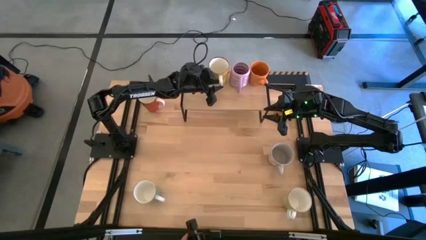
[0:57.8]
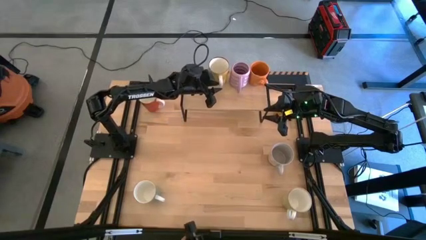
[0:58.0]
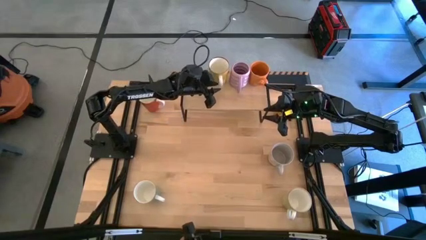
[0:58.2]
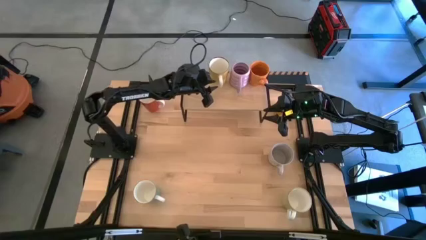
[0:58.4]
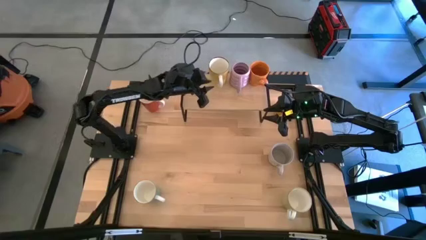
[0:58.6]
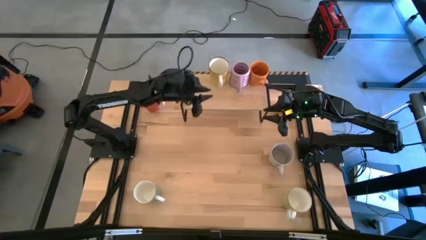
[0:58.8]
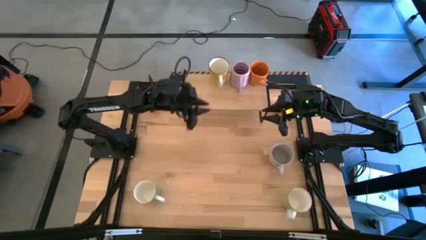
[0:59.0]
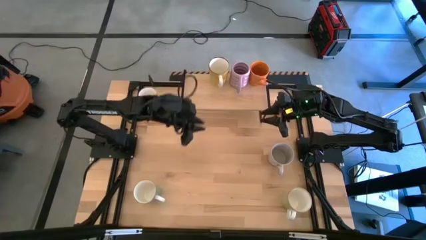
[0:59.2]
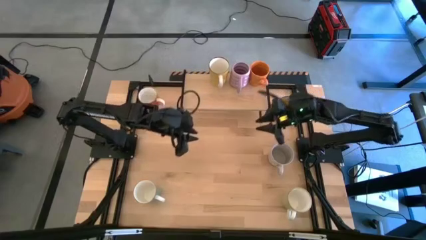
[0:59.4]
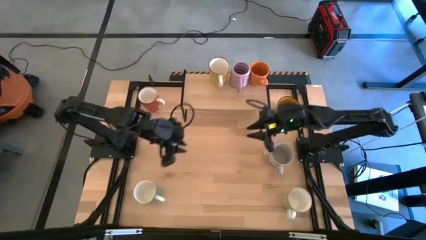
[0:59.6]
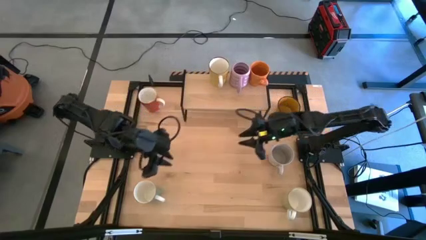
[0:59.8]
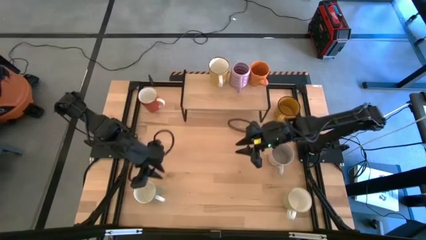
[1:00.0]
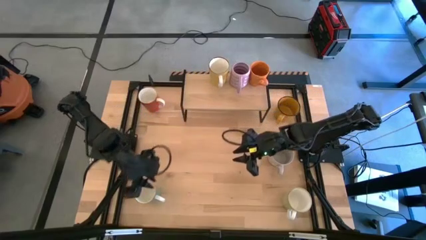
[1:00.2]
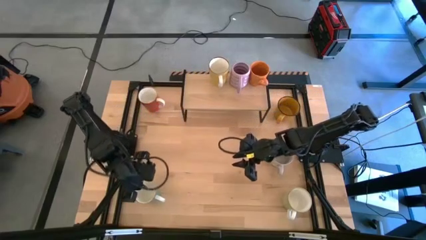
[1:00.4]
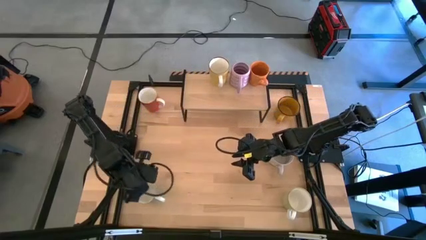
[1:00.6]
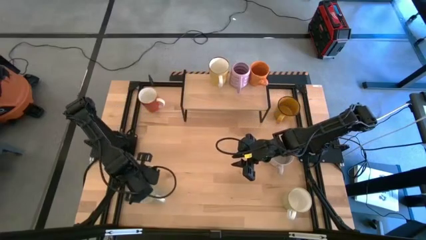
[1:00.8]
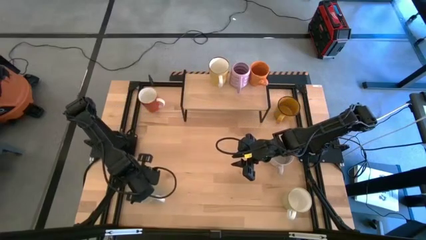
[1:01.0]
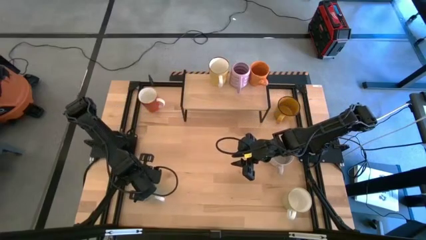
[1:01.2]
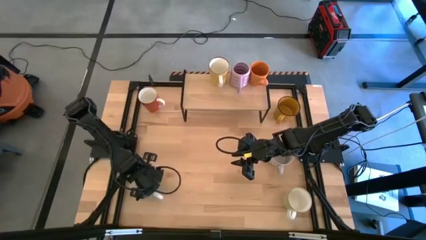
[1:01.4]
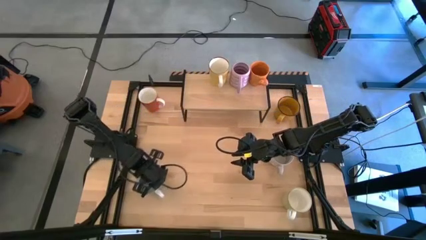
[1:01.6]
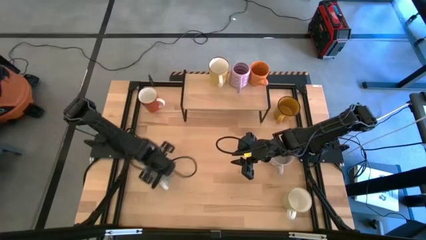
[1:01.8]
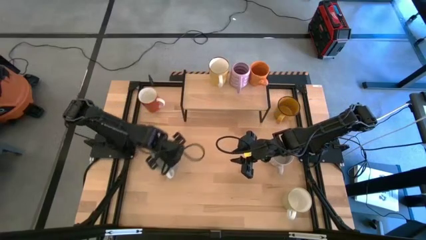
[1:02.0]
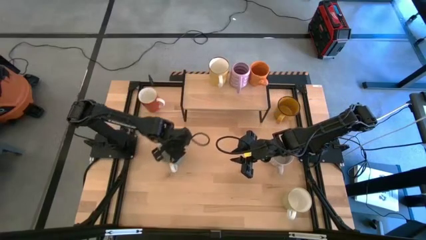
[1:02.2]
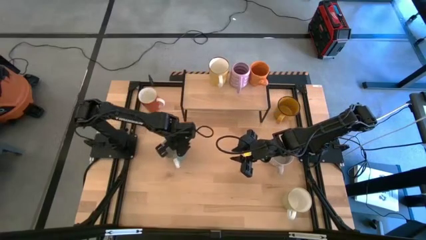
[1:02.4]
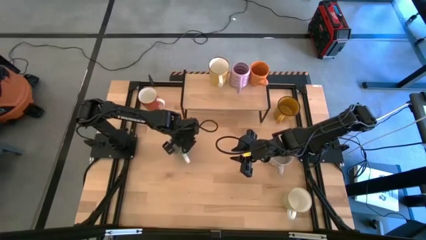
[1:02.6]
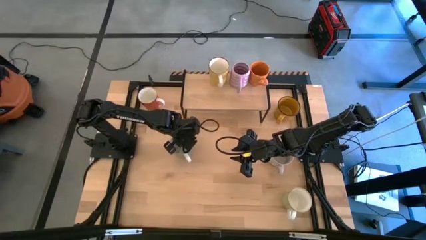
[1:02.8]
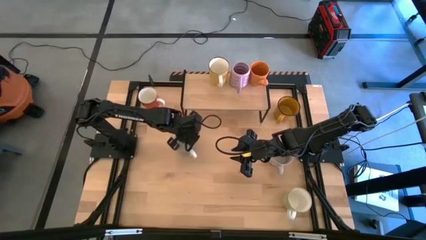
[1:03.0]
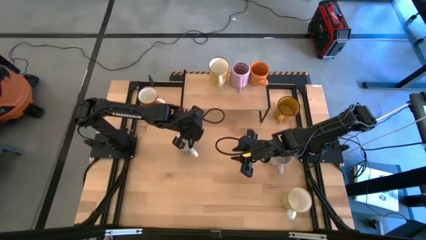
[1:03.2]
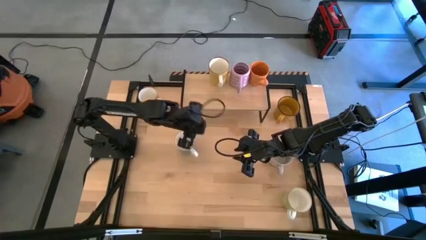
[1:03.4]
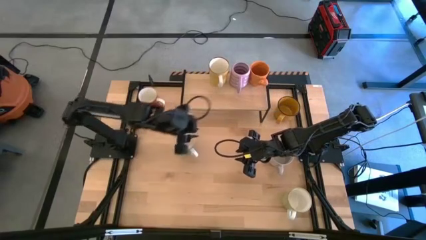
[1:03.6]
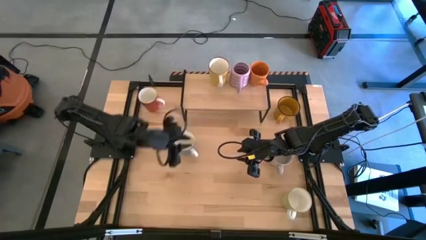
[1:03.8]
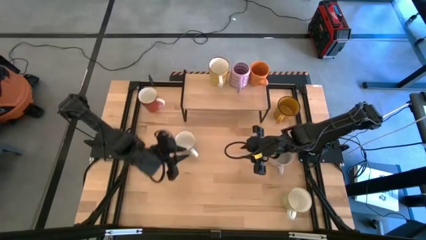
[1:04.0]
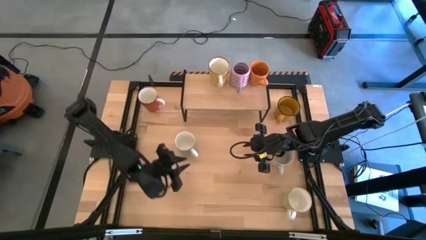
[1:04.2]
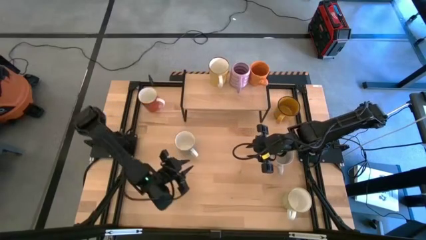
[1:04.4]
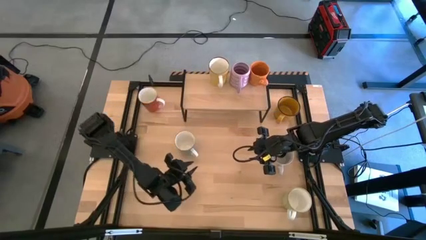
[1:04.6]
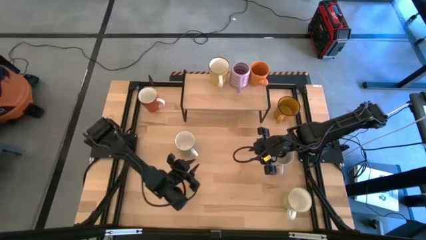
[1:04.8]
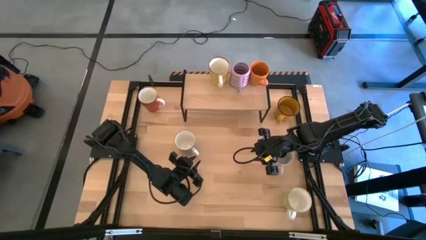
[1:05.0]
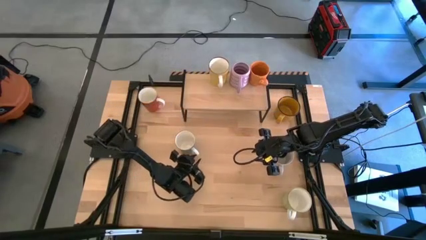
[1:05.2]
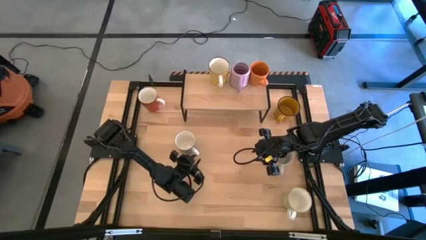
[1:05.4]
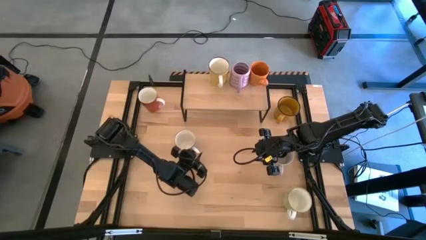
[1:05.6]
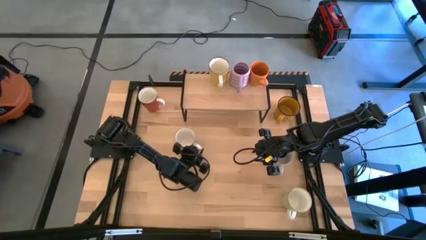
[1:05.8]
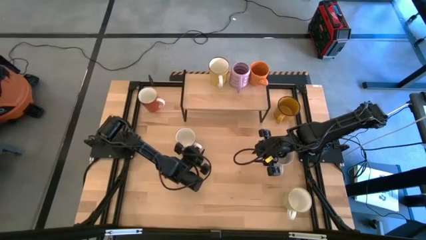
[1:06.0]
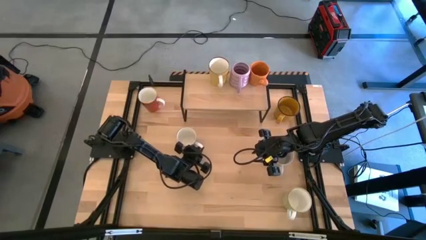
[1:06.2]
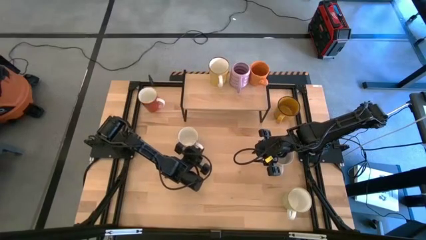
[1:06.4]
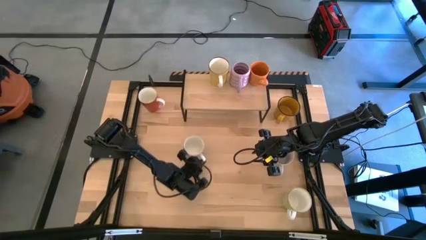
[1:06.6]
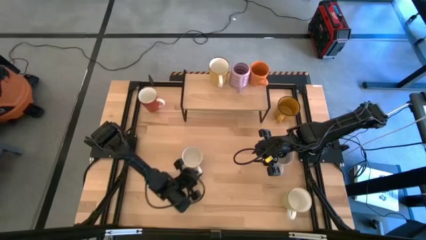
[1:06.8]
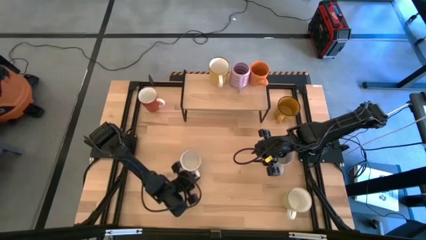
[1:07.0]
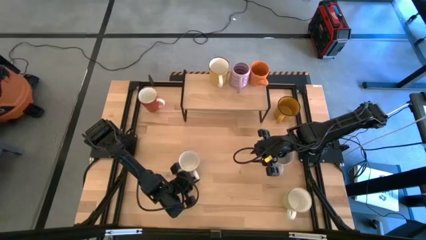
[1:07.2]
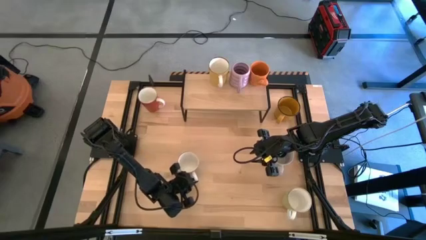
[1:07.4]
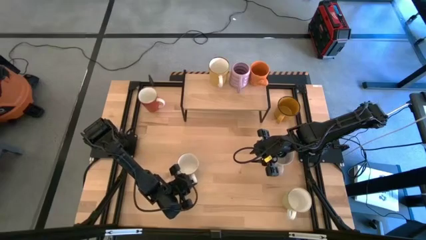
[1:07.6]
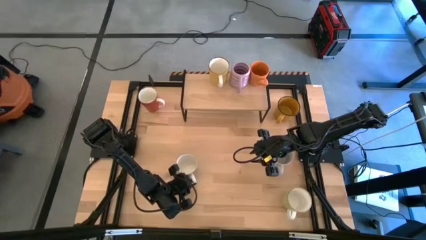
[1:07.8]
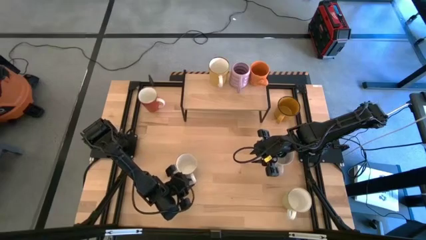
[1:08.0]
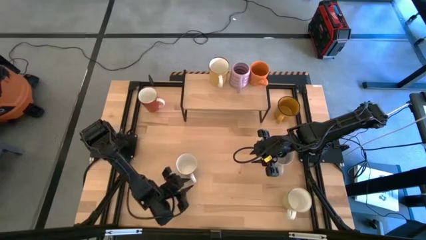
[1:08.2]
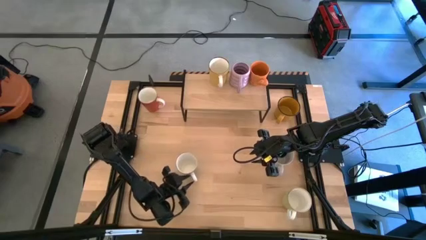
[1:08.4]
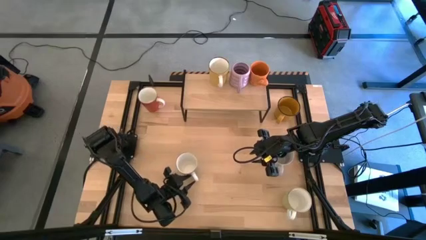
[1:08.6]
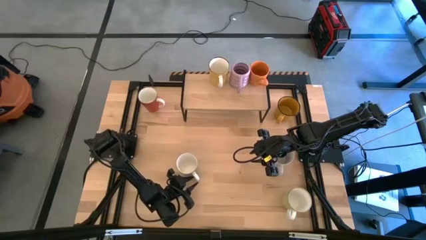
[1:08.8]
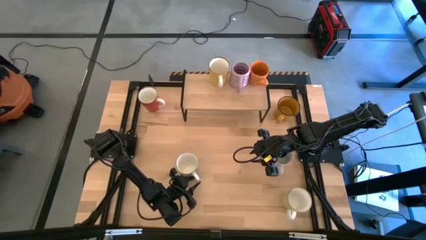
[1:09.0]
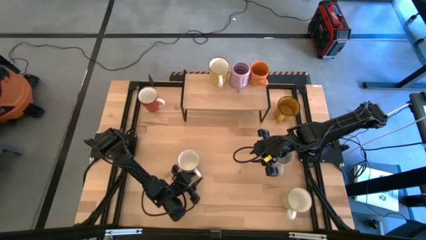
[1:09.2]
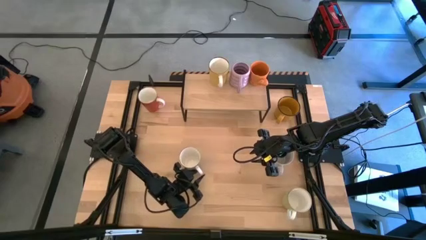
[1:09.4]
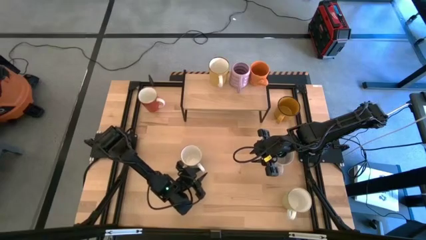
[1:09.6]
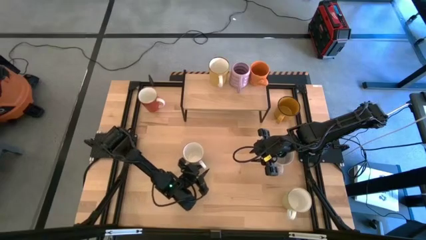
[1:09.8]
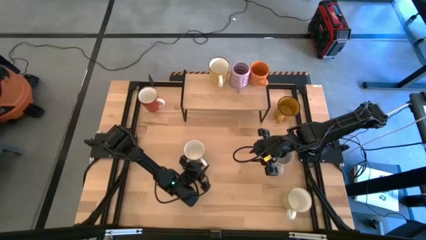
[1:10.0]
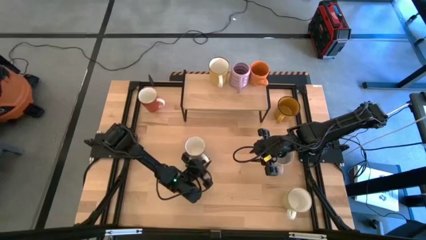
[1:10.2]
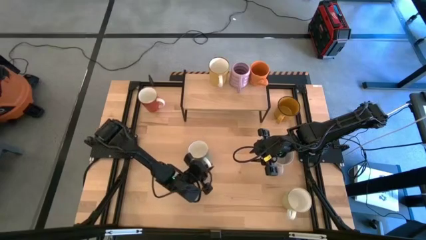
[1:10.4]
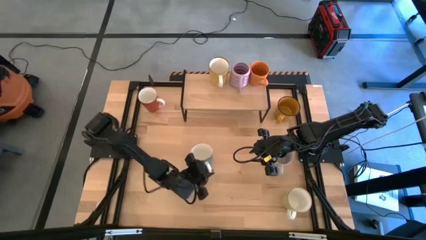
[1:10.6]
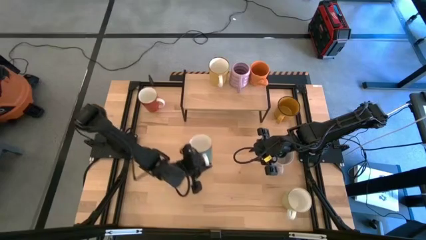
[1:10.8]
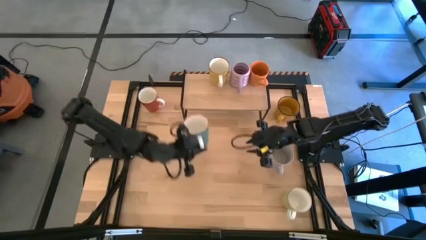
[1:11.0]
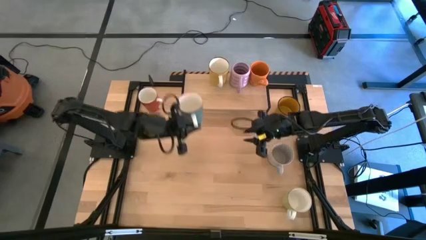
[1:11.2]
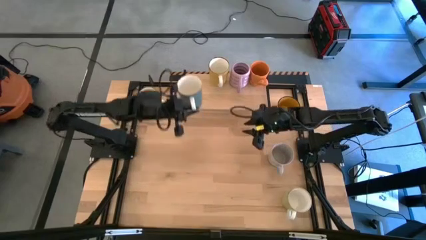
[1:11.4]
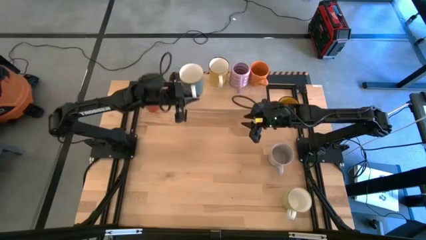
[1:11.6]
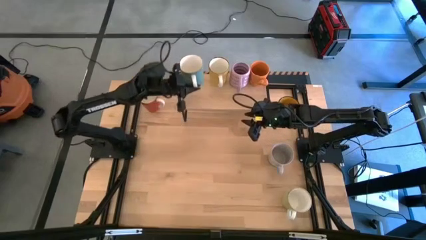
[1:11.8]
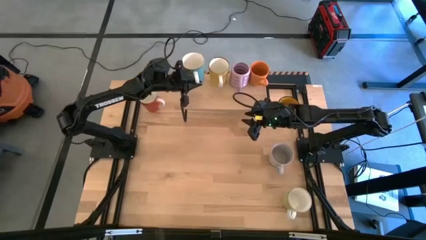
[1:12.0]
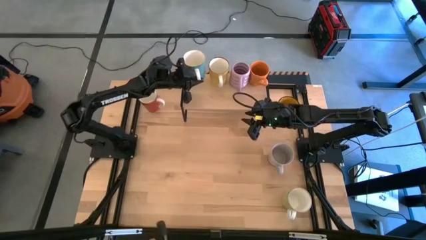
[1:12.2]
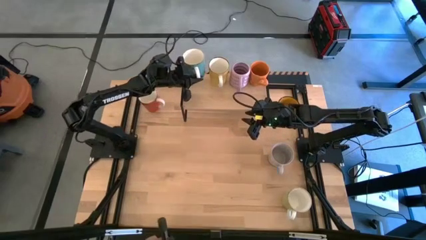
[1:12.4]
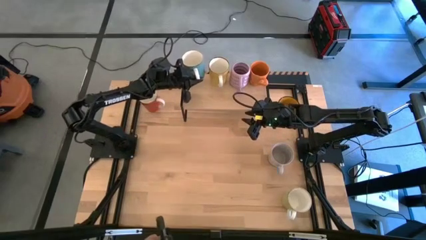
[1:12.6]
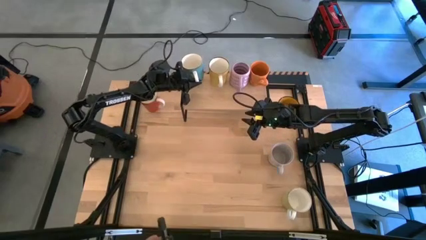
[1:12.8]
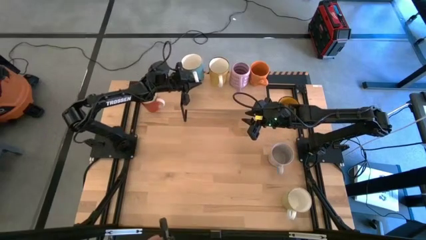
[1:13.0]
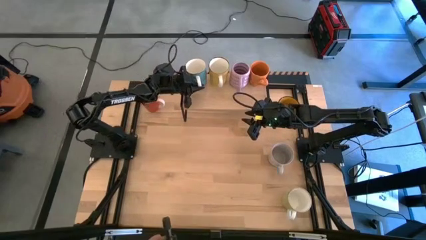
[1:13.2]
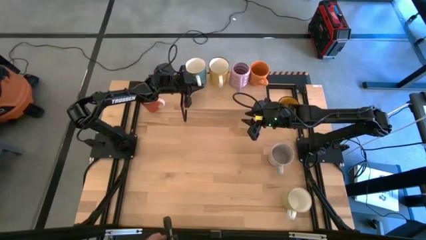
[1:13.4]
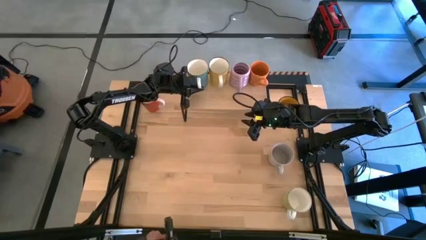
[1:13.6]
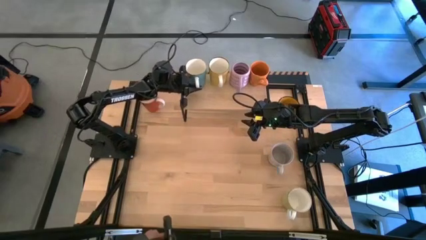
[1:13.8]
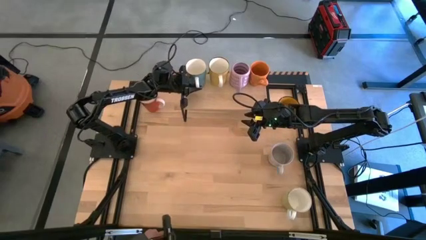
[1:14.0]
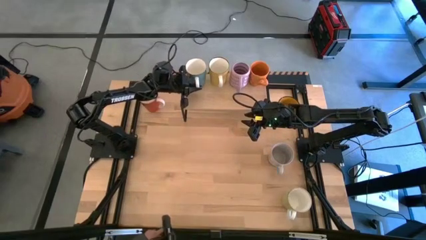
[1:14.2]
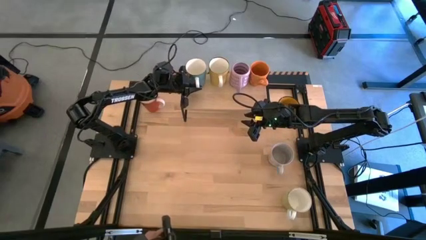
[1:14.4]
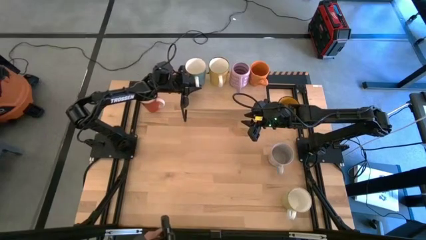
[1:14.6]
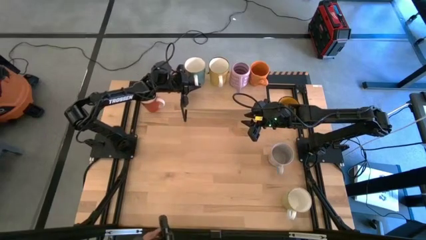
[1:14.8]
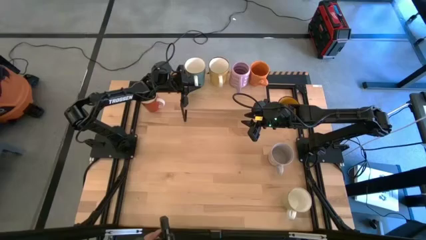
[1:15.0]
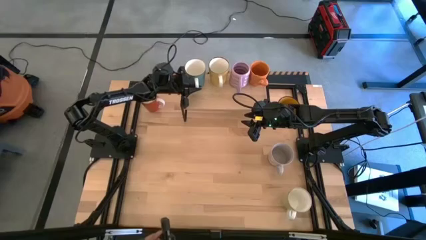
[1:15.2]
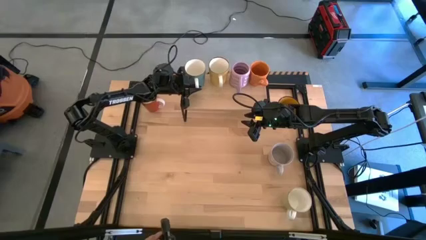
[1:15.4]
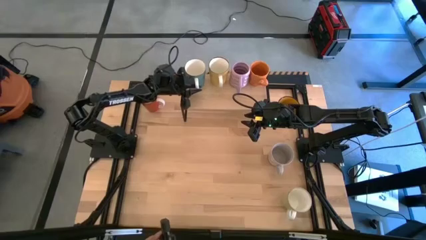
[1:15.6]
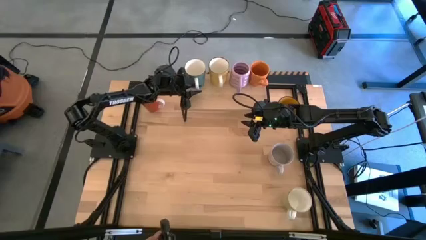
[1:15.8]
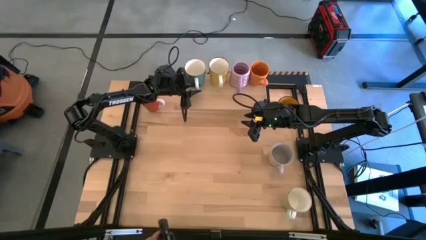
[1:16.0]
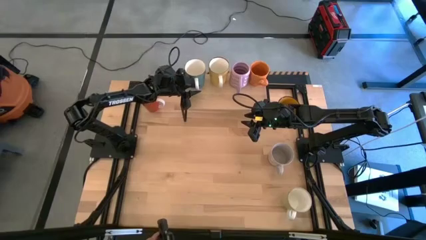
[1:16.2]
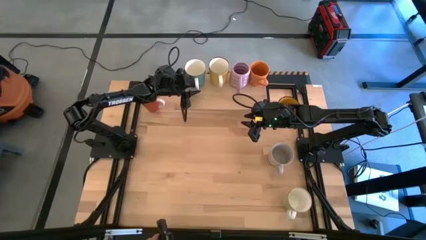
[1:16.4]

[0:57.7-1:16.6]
Task: Place coffee mugs
Put the blue mug on the shelf
